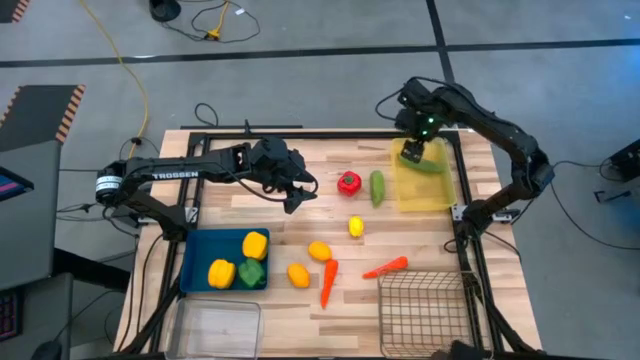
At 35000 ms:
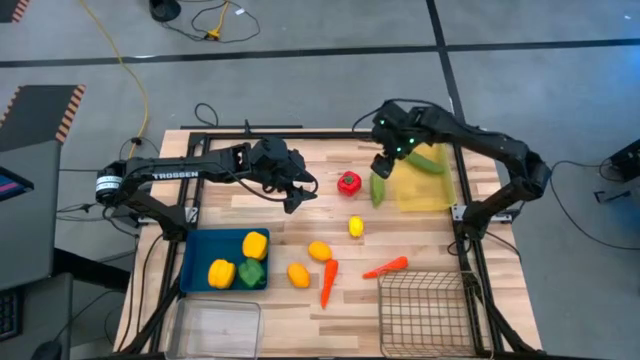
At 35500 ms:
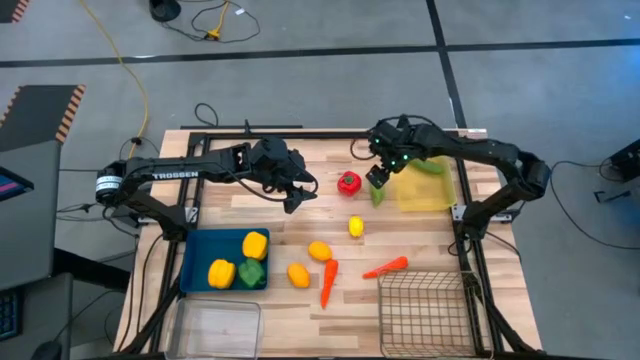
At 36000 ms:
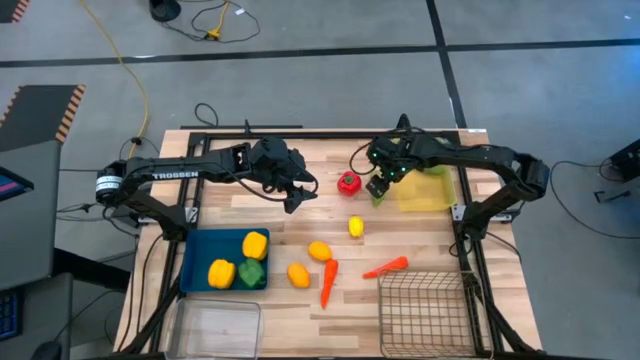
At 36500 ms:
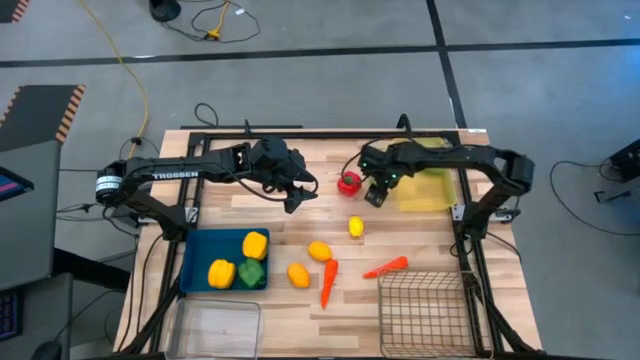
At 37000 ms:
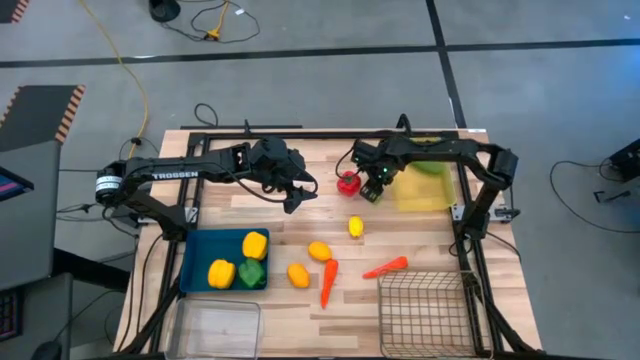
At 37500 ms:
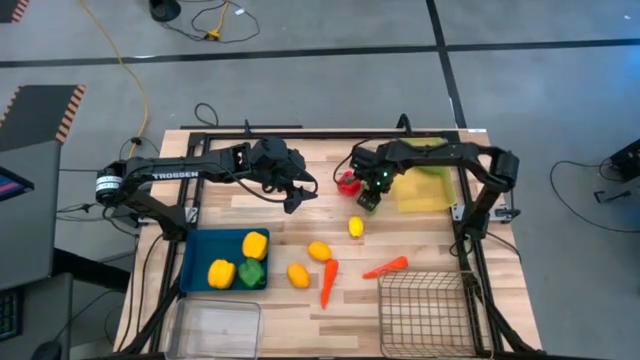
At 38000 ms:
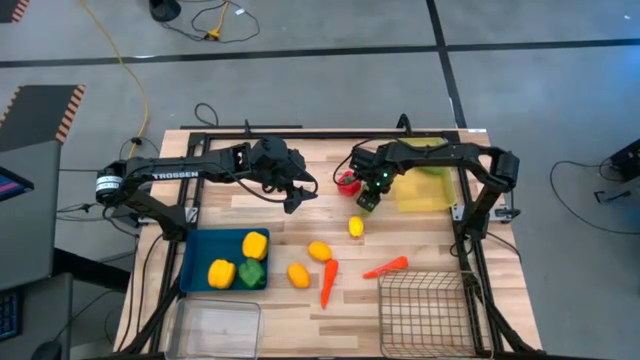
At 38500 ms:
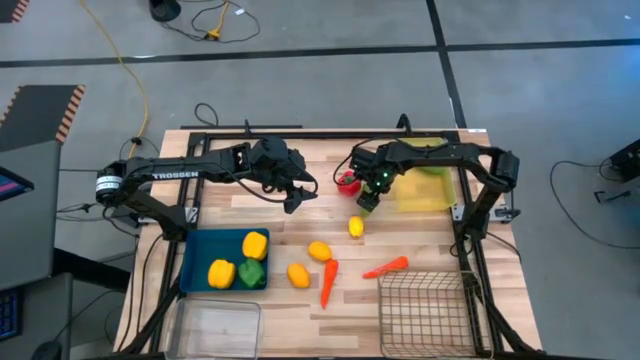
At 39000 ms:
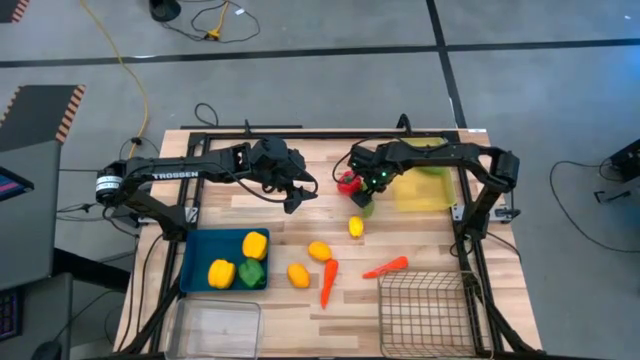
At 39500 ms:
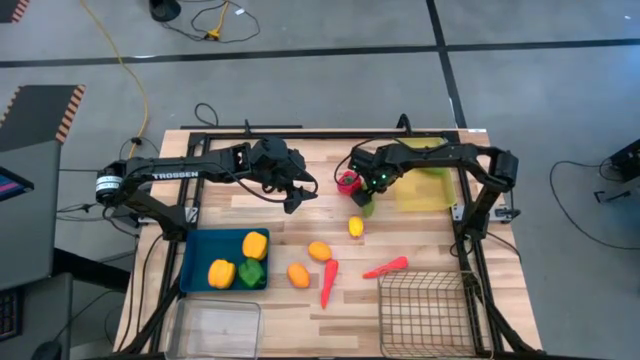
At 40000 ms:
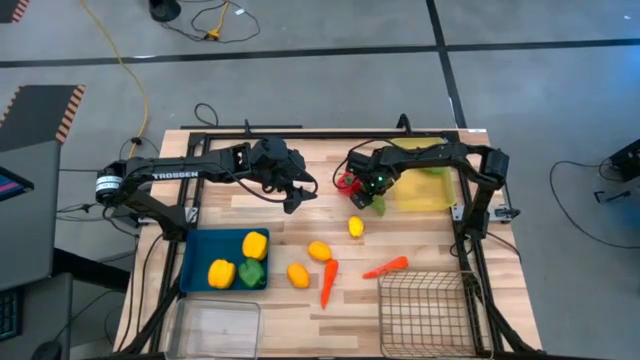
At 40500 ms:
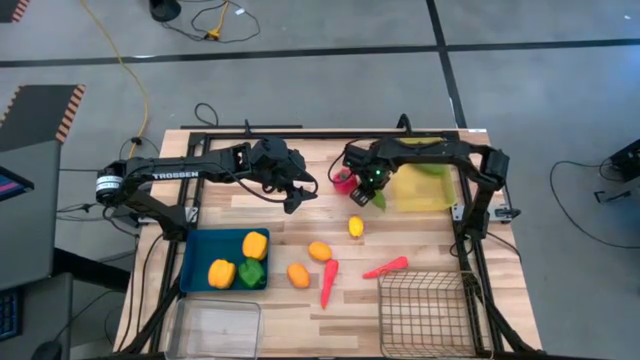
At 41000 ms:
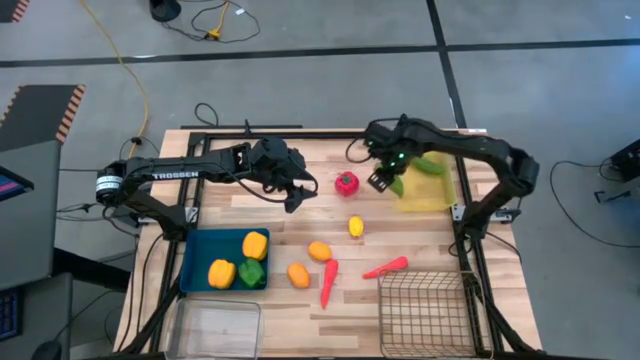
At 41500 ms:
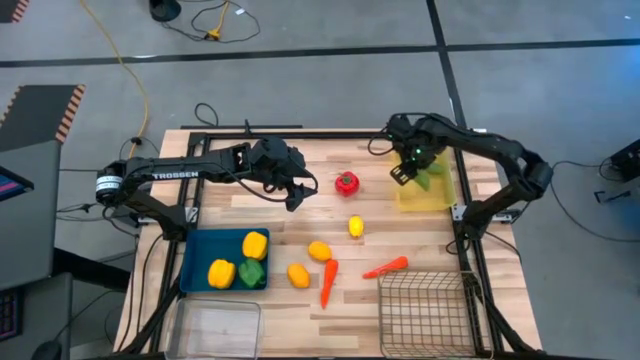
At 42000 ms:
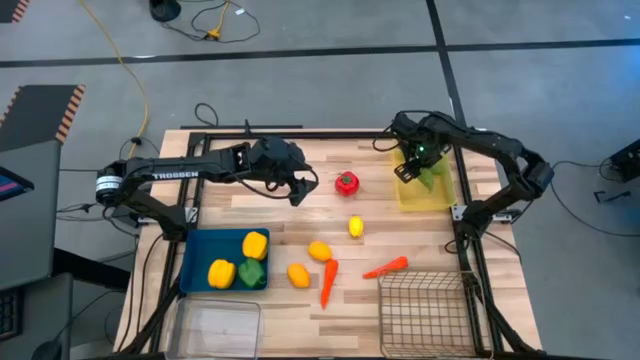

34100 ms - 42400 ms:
Task: Sort produce into baskets
Put the green cucumber into the yellow bin

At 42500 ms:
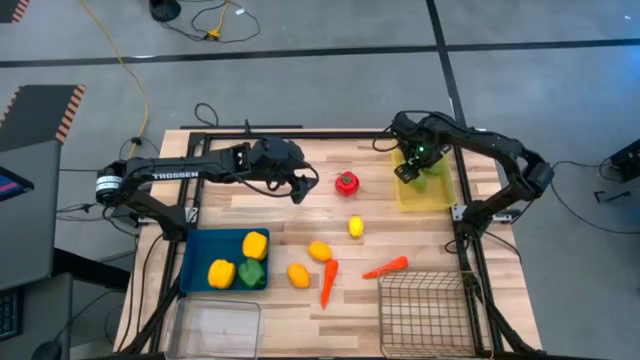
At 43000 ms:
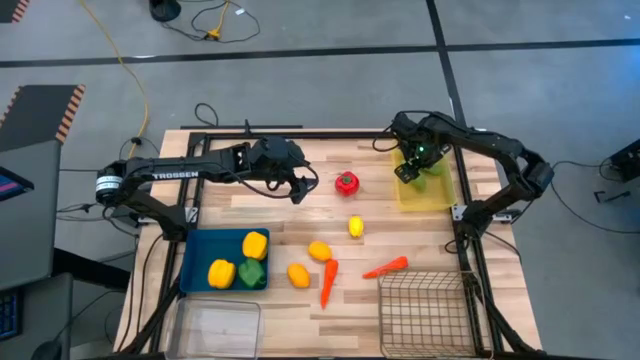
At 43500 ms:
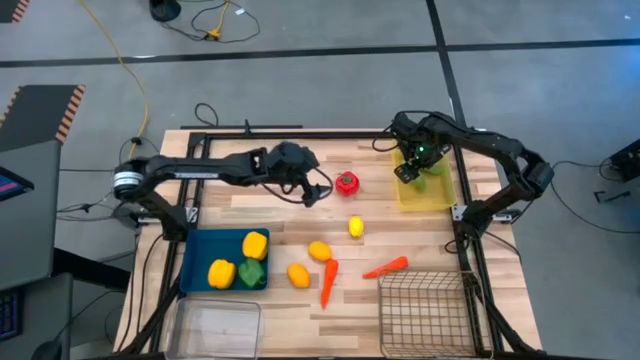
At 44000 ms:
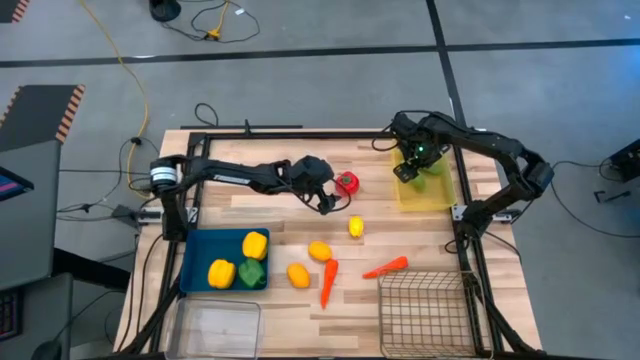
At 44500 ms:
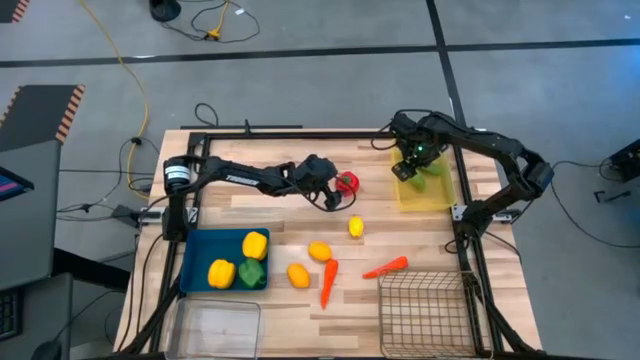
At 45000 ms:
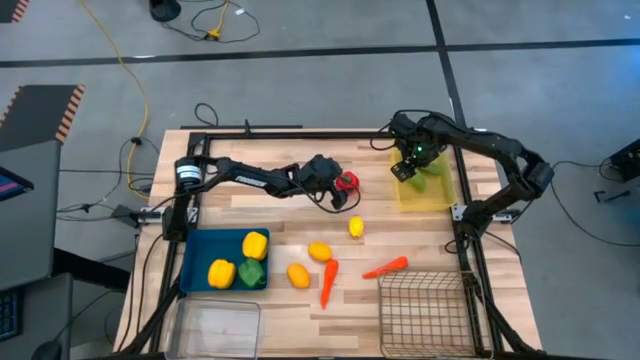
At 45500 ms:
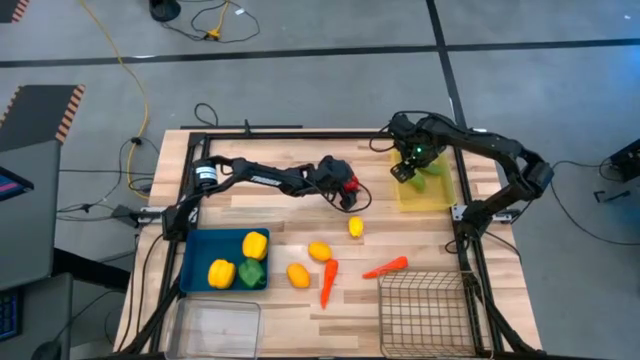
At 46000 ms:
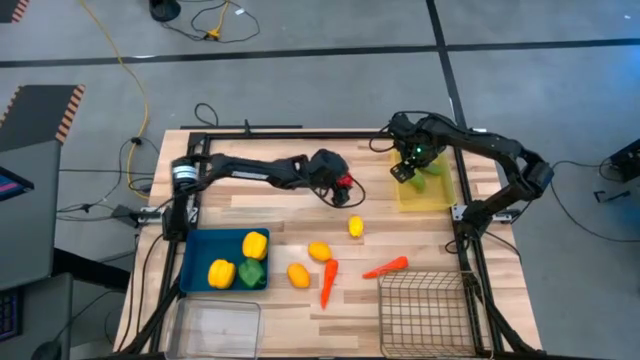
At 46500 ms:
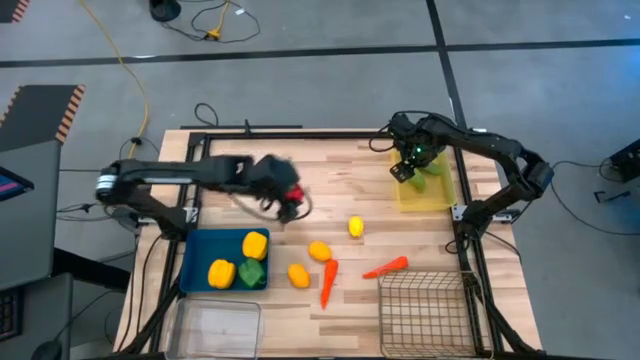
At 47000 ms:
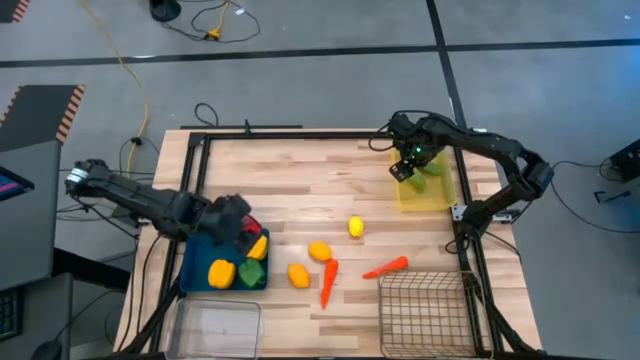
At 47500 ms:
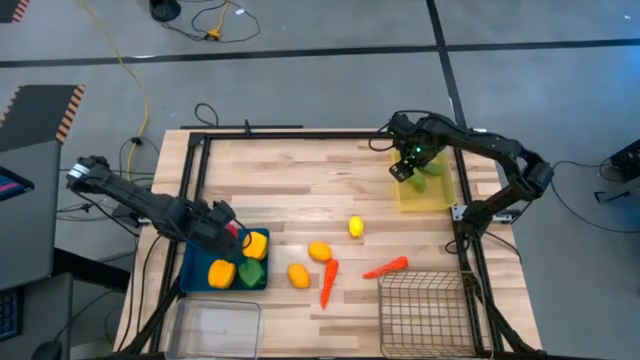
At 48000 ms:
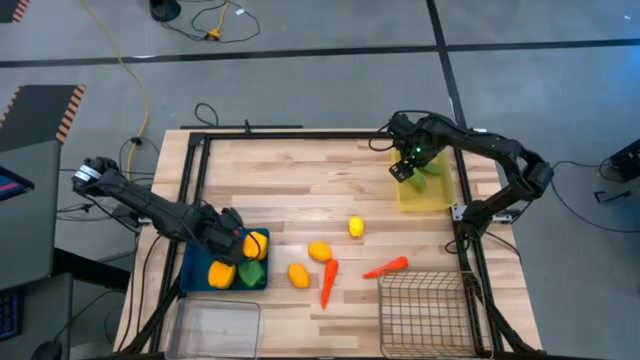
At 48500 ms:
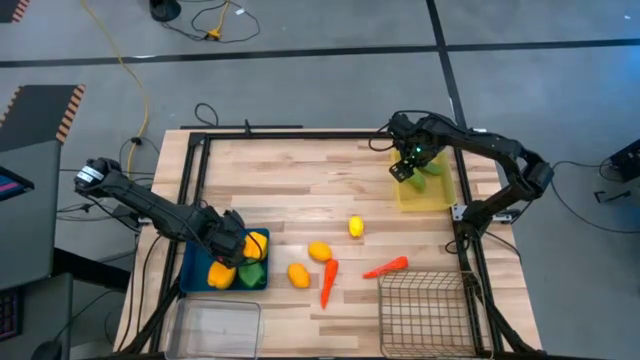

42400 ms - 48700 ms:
Put the red bell pepper into the blue bin

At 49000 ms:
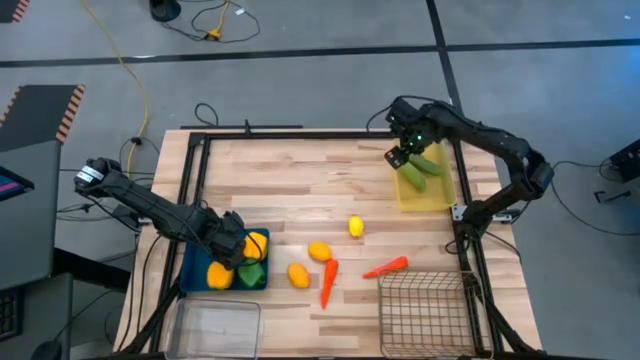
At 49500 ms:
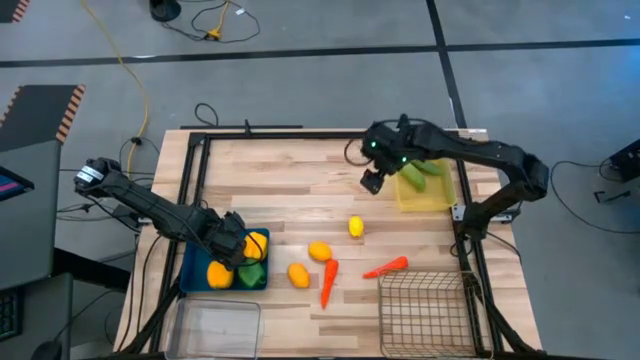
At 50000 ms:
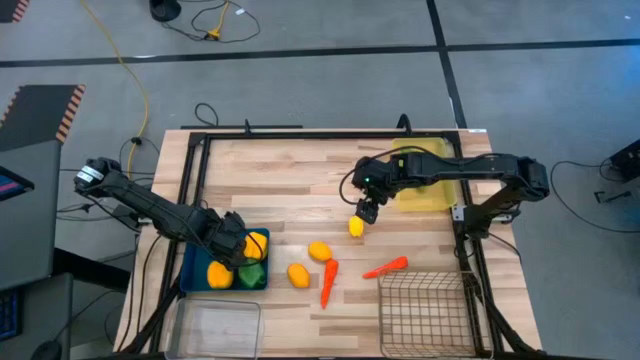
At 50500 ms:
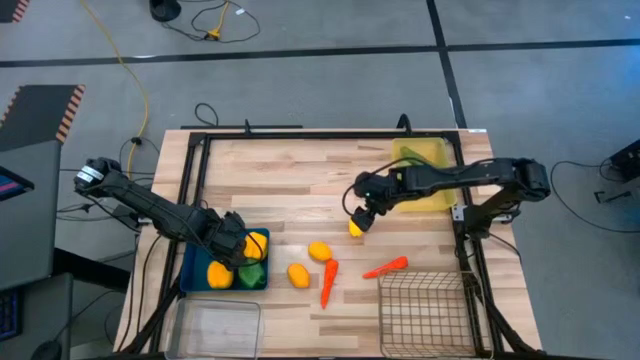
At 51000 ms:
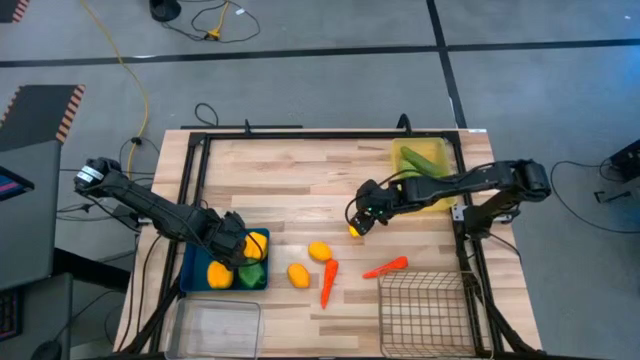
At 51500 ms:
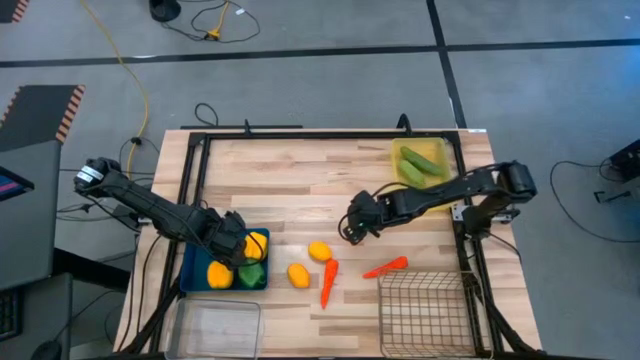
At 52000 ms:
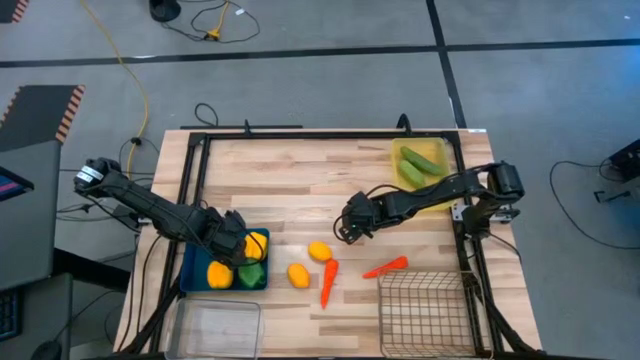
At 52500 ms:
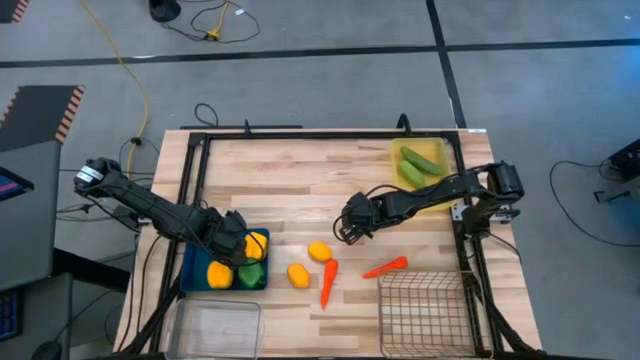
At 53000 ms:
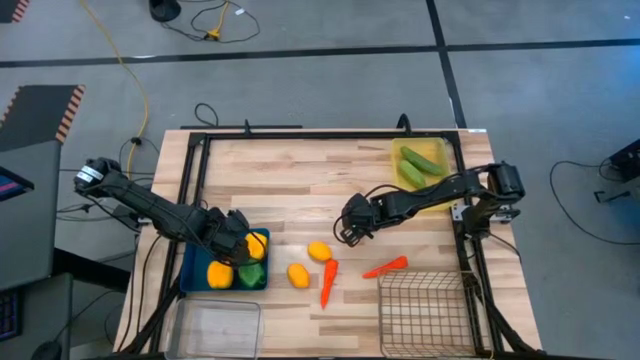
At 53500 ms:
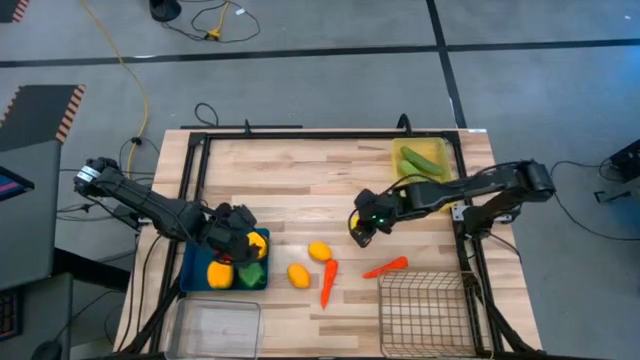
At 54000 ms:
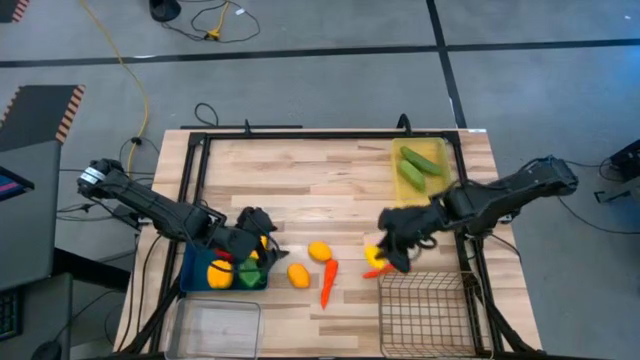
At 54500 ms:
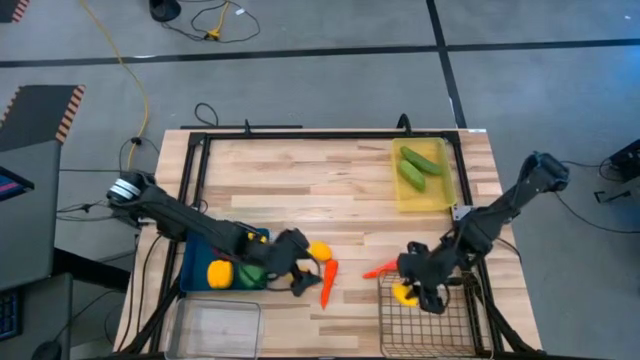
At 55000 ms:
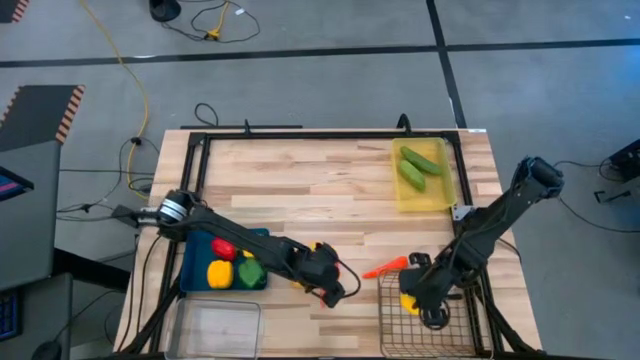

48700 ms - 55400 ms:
Put the yellow lemon into the wire basket
